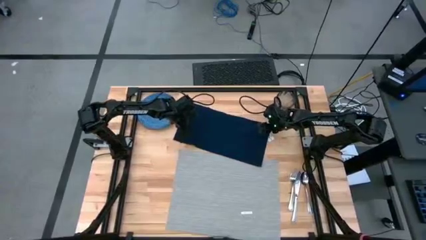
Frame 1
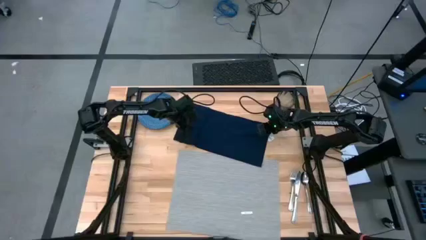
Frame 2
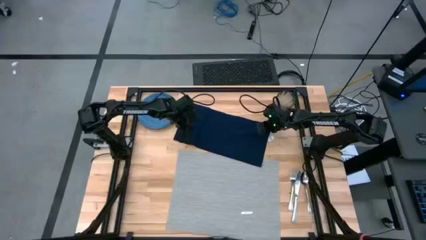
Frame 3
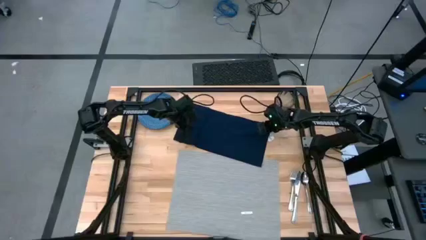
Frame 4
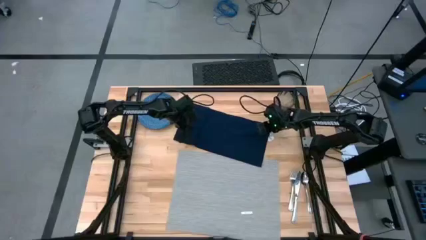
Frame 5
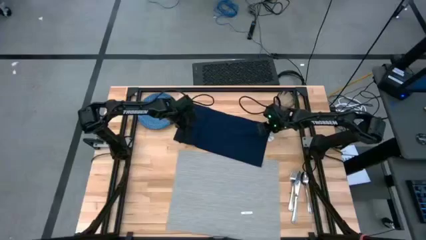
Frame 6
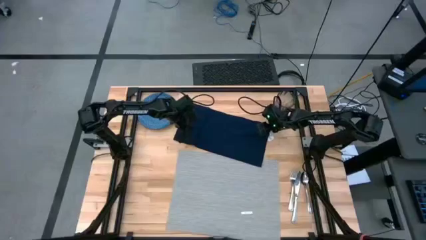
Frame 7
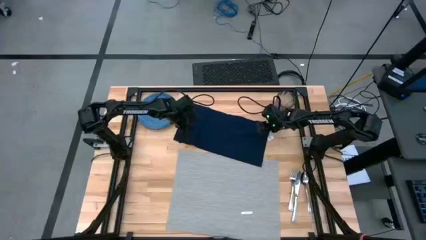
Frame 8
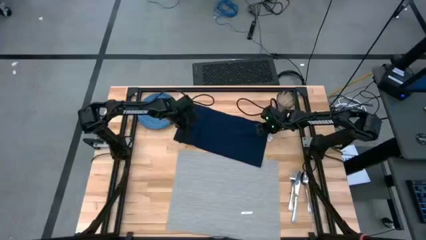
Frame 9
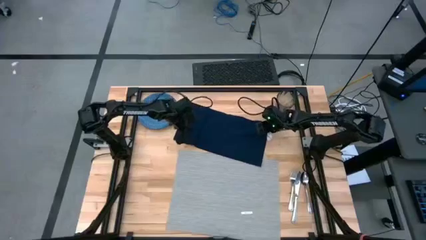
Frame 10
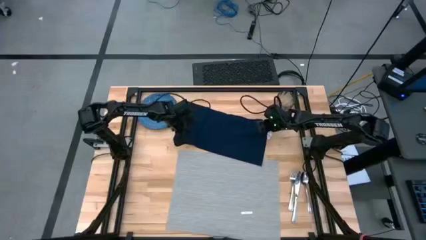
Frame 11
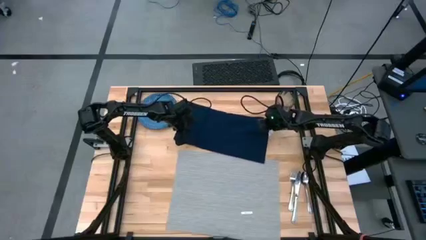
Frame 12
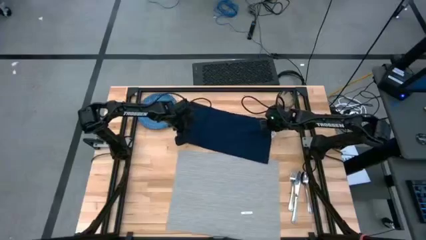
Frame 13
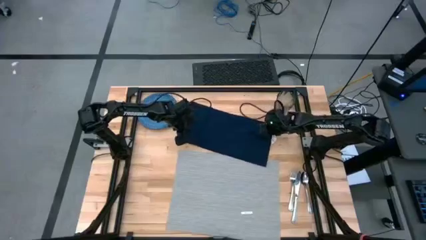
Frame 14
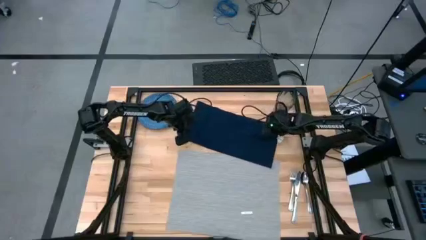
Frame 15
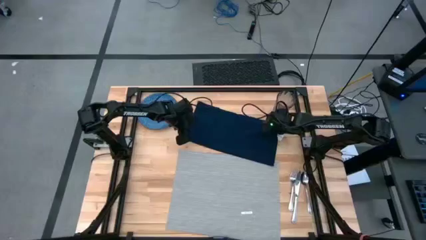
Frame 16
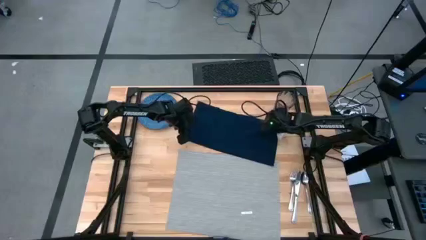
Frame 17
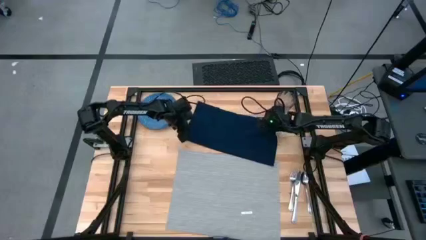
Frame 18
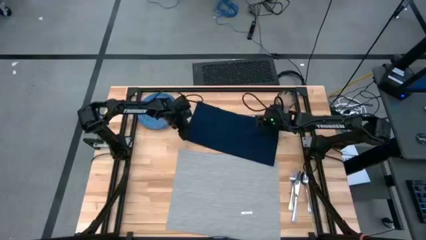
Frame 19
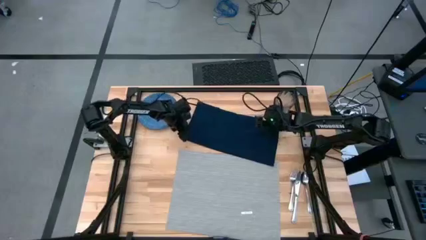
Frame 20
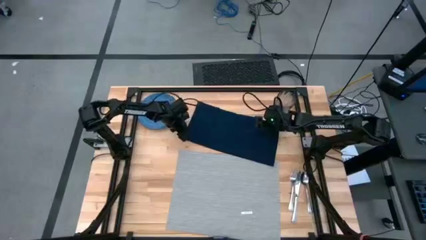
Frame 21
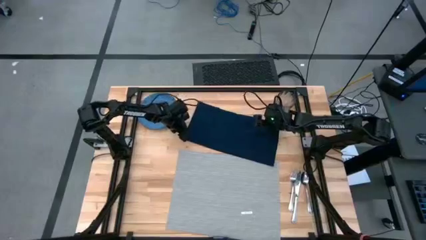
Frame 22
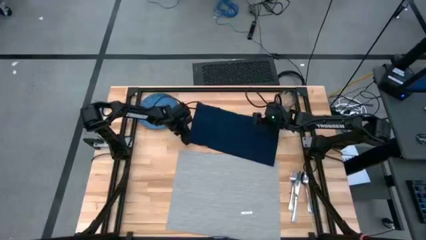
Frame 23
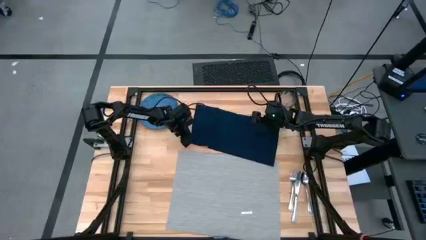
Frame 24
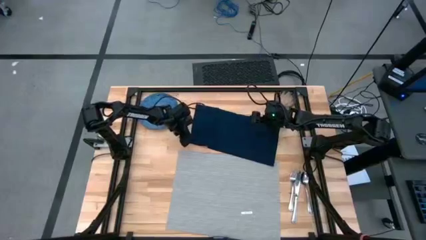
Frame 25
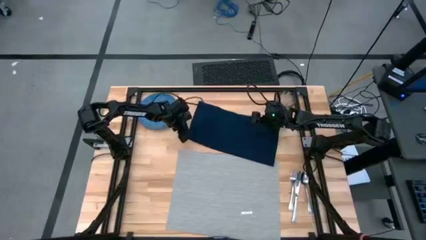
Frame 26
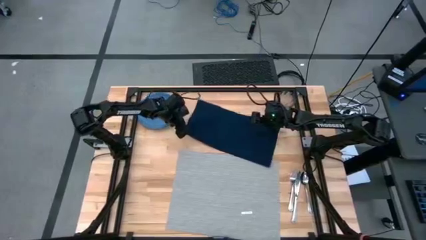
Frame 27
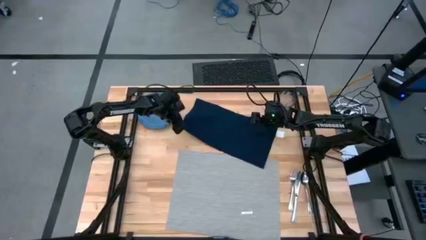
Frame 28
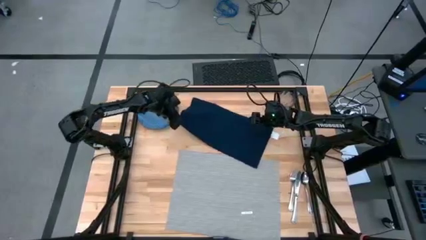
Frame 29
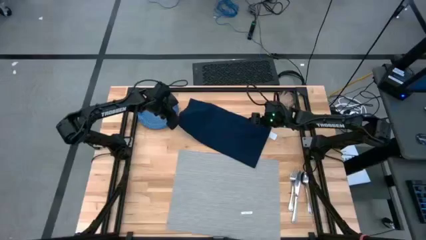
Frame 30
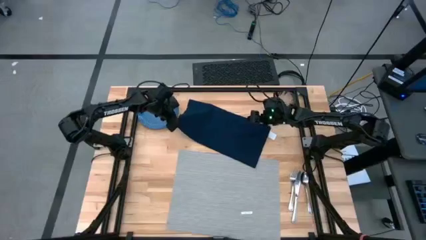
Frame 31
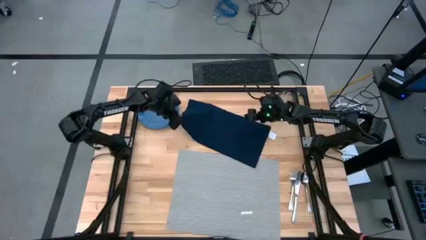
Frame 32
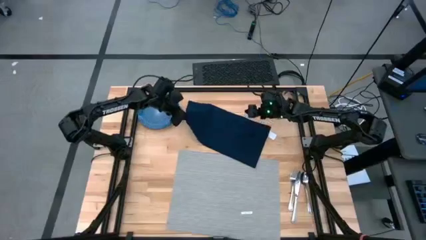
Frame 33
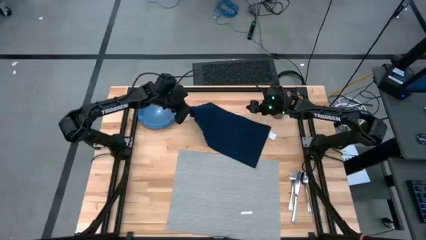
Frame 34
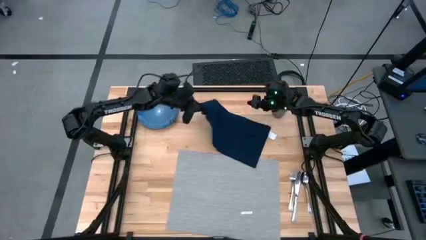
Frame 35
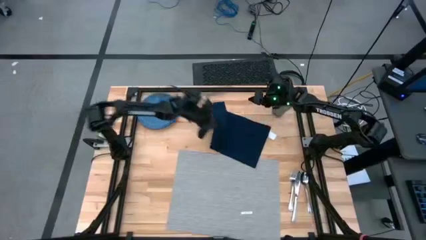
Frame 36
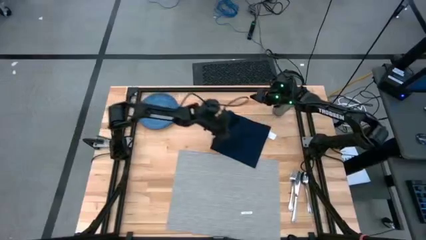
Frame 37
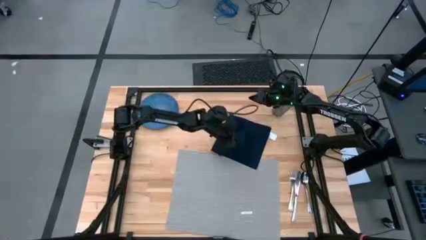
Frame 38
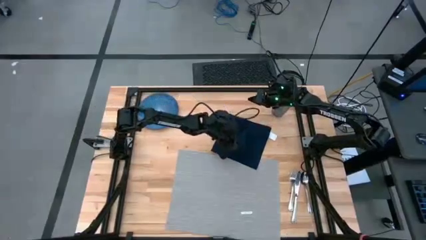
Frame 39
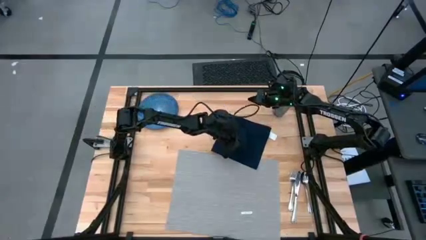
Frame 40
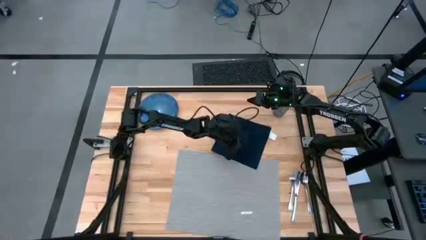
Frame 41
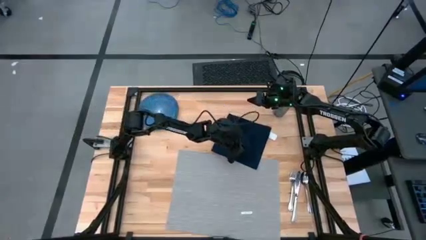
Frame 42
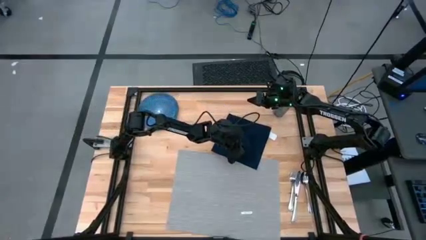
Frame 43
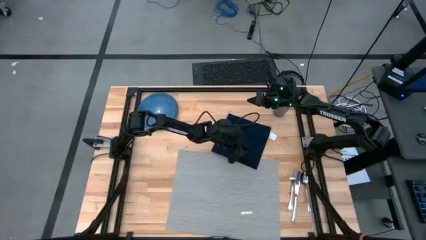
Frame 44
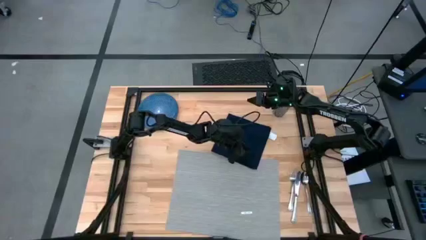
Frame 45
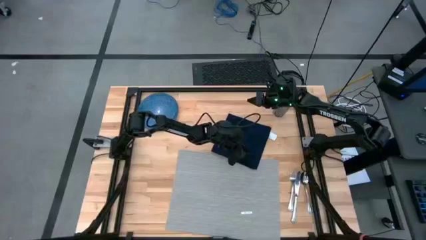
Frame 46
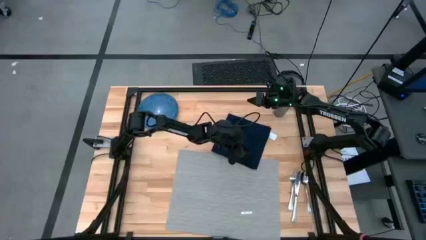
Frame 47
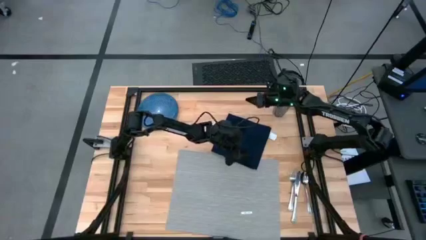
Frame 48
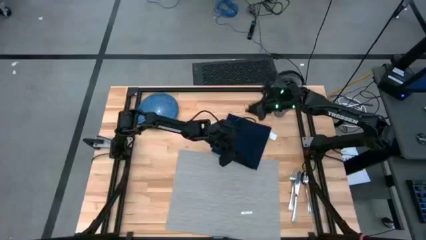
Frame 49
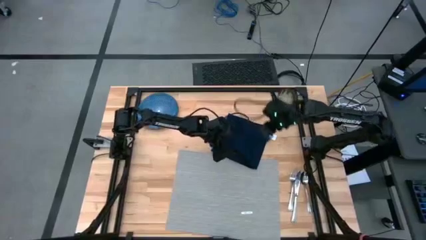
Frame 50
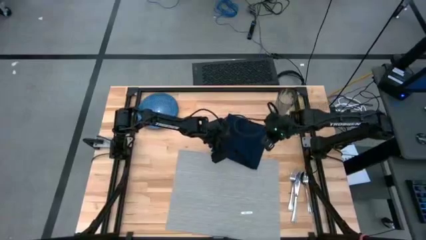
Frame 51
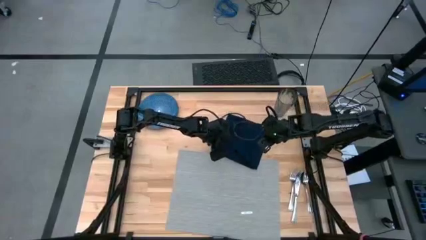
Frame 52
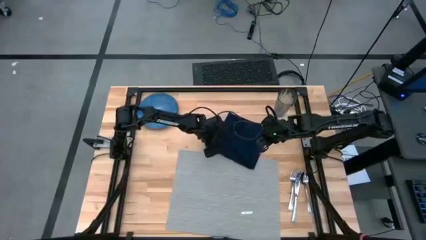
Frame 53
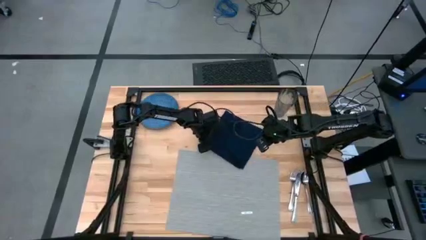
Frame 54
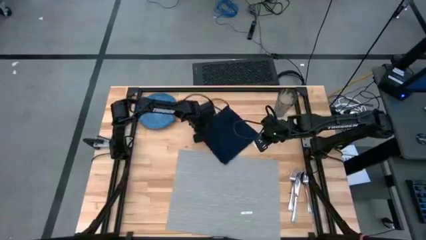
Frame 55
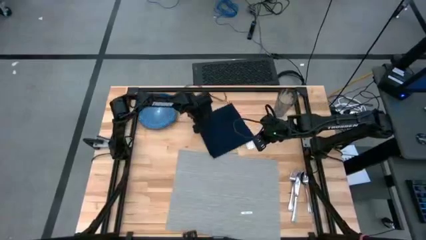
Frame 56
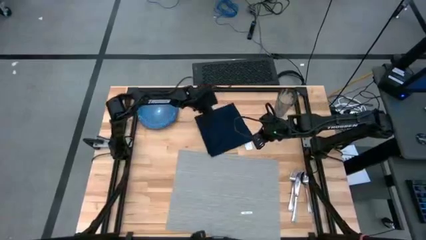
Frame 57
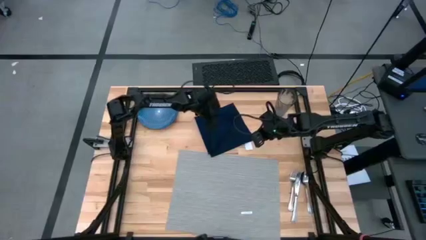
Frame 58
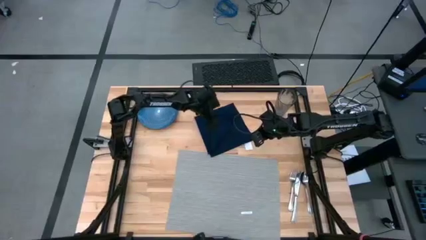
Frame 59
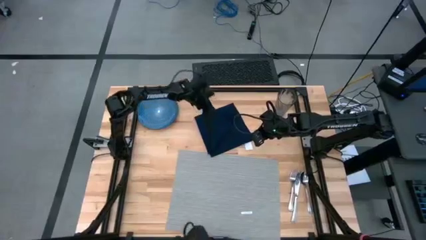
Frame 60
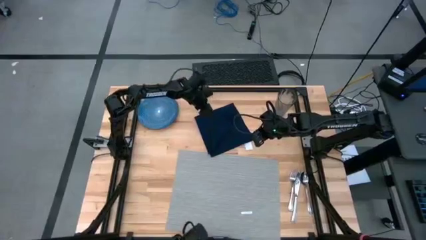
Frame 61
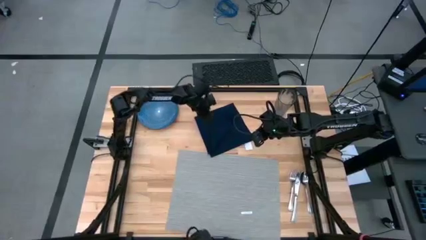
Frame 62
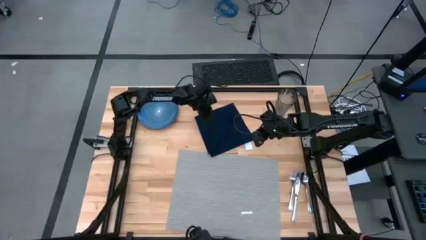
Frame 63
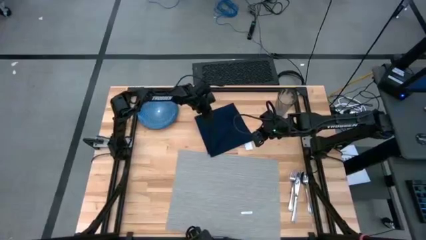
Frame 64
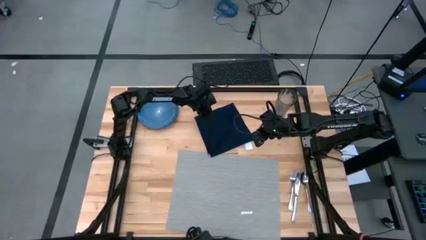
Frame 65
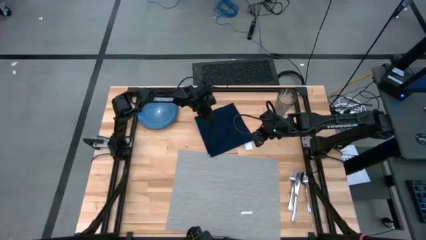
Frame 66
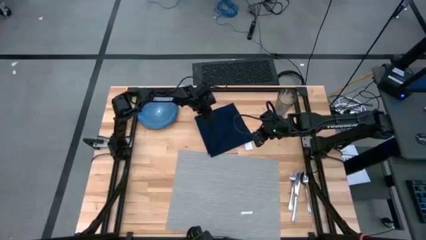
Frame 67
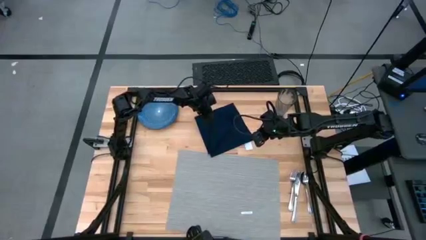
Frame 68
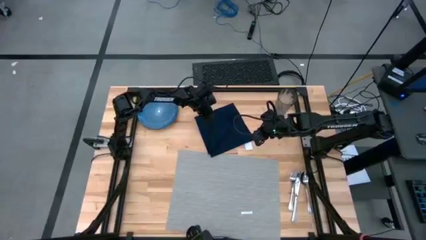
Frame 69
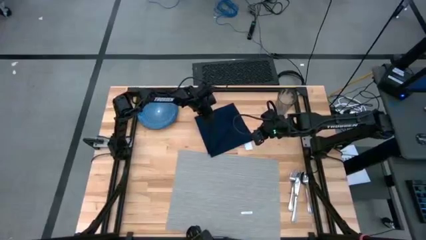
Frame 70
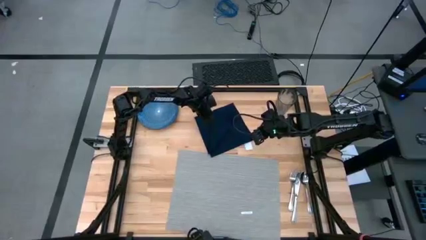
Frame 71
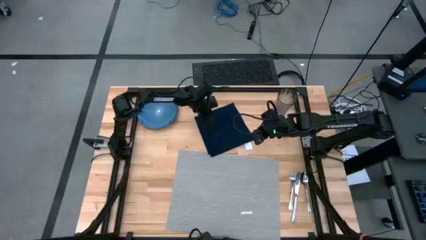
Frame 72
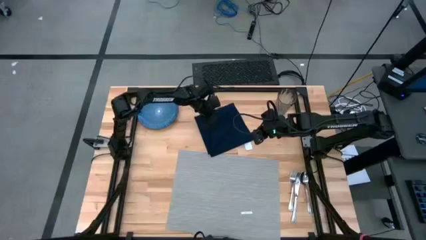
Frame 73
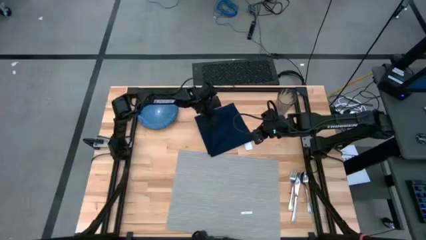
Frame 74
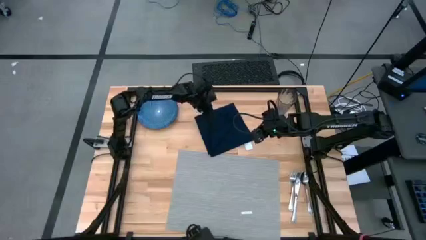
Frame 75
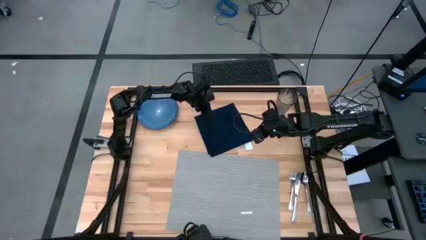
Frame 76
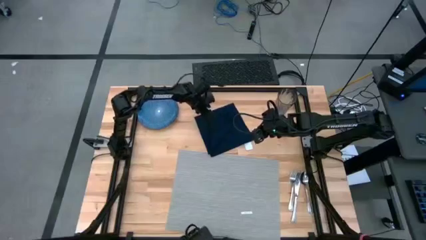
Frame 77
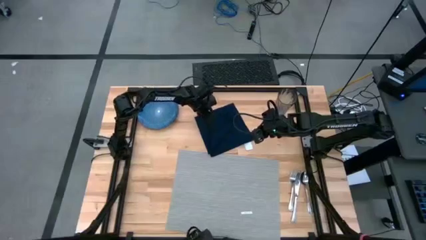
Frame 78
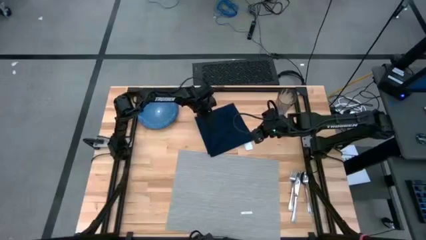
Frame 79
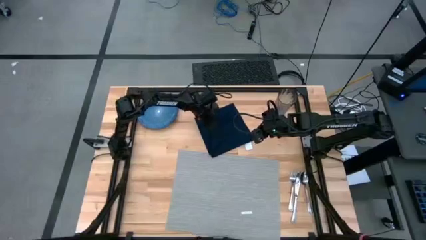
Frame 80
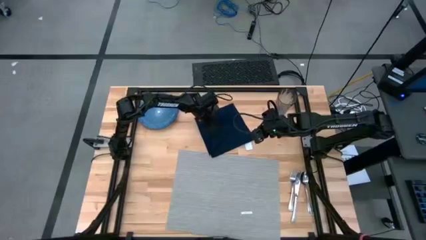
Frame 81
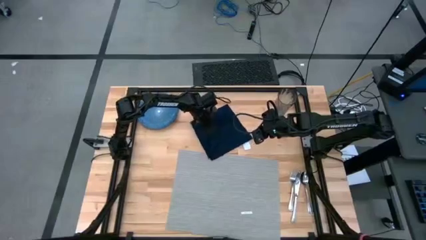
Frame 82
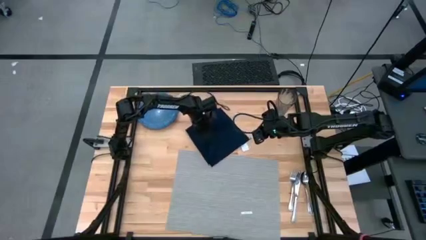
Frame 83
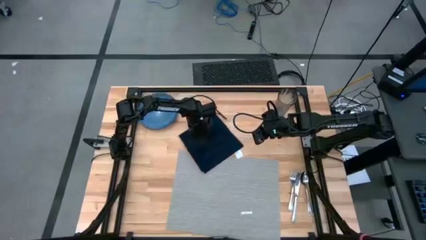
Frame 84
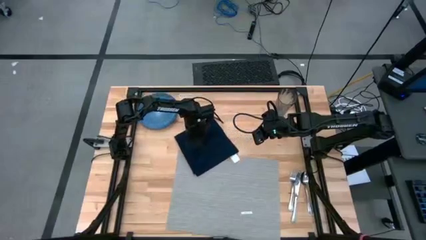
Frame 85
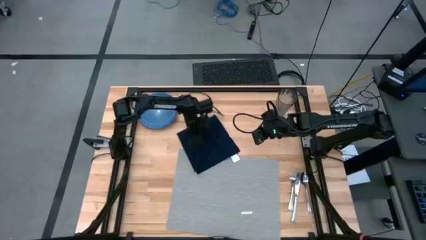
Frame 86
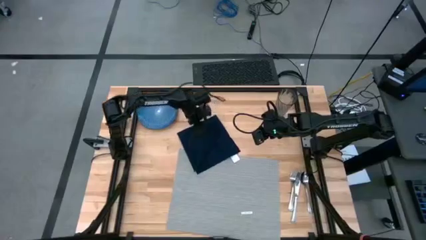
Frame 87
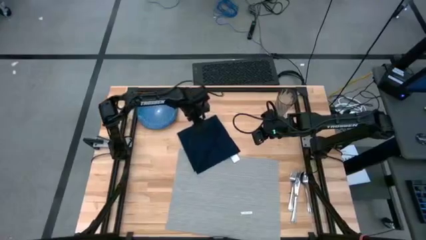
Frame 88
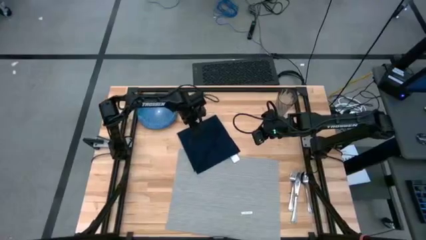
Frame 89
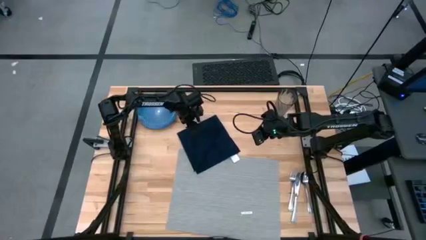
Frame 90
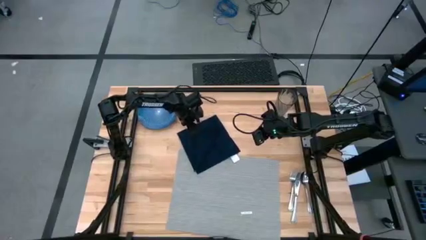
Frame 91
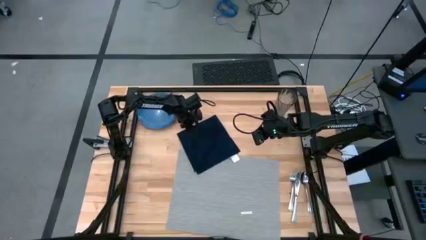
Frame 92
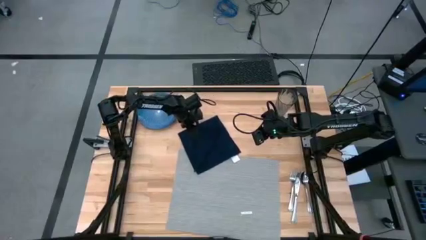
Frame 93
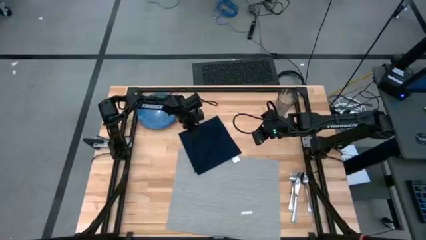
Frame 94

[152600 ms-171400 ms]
Task: Set table place
Fold the dark blue napkin
